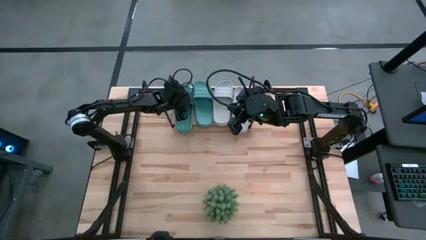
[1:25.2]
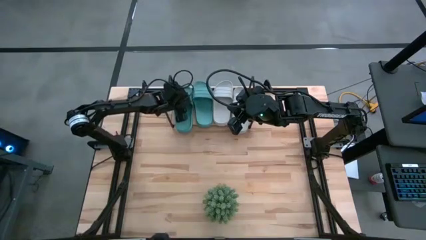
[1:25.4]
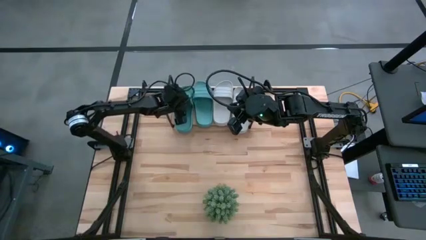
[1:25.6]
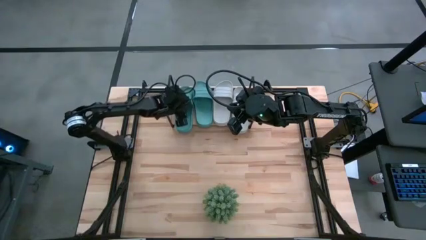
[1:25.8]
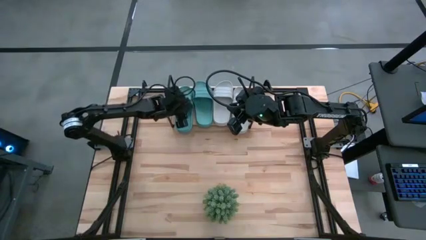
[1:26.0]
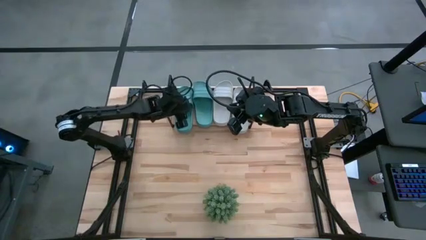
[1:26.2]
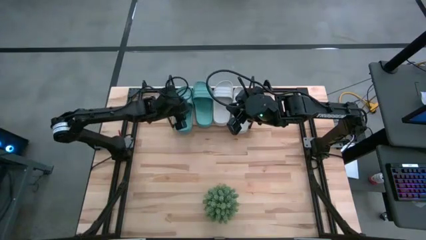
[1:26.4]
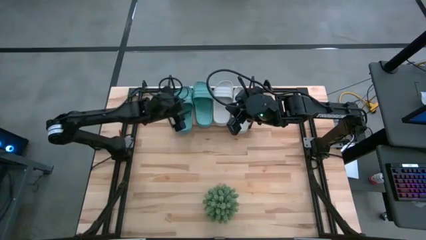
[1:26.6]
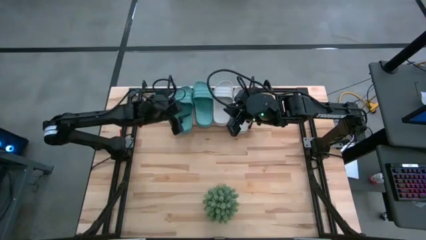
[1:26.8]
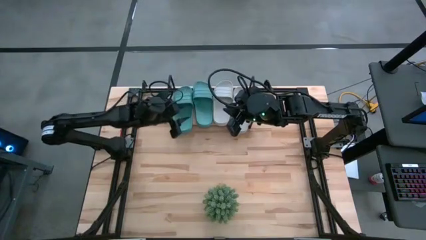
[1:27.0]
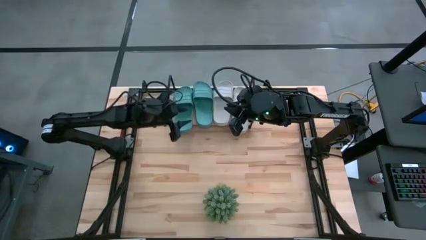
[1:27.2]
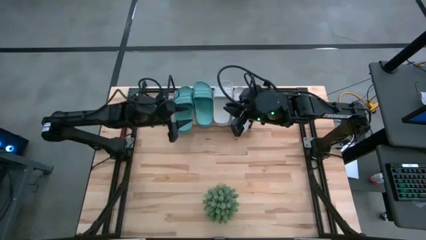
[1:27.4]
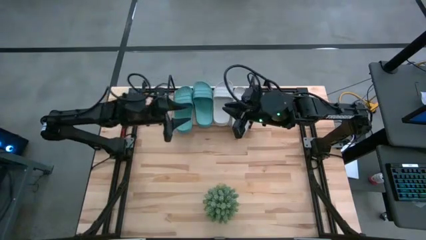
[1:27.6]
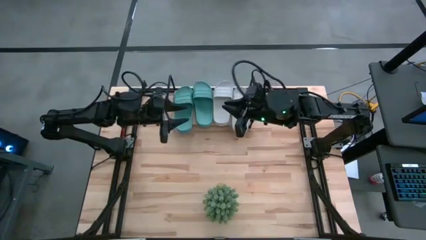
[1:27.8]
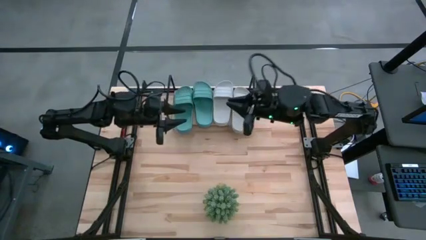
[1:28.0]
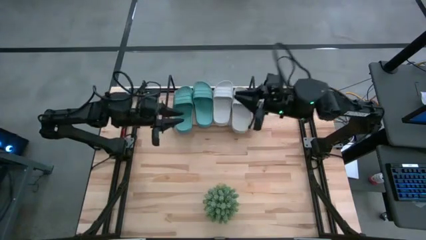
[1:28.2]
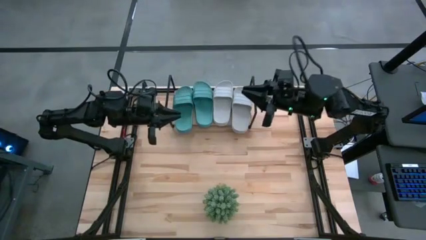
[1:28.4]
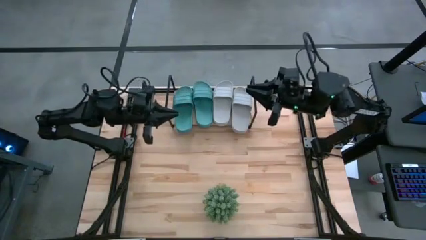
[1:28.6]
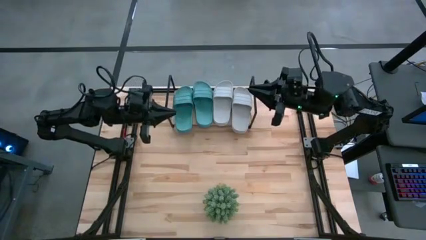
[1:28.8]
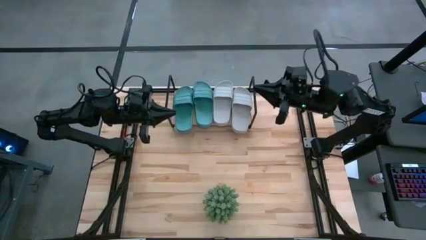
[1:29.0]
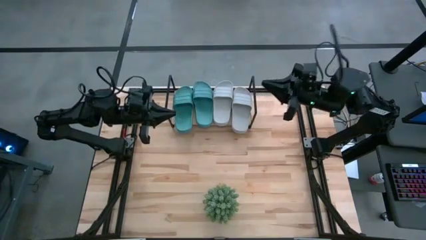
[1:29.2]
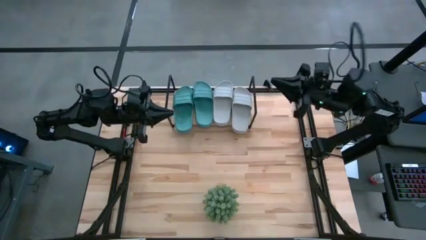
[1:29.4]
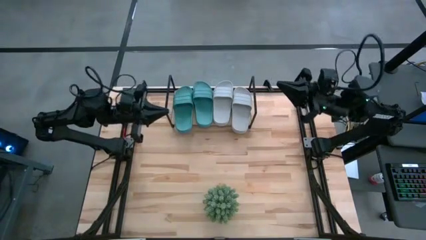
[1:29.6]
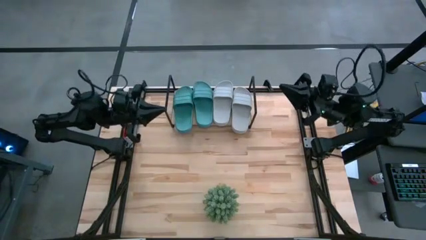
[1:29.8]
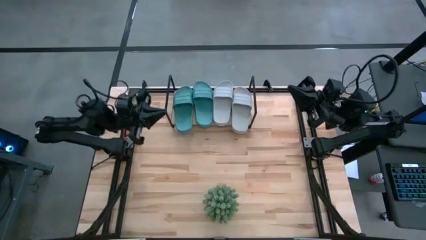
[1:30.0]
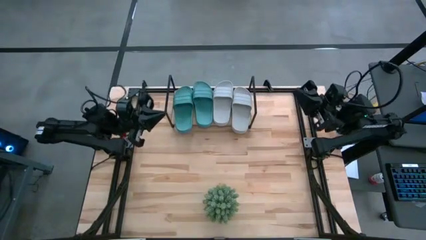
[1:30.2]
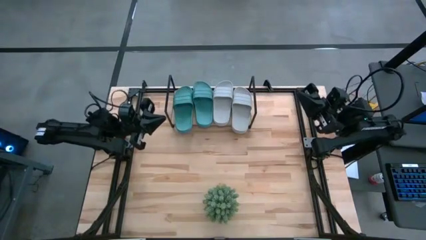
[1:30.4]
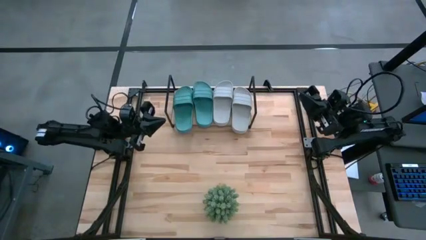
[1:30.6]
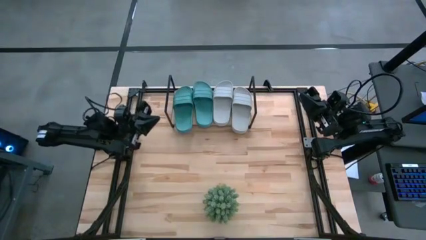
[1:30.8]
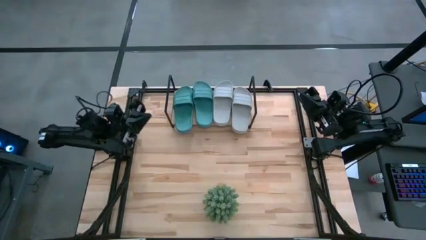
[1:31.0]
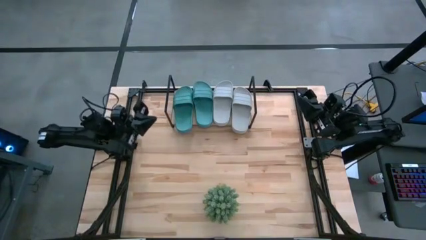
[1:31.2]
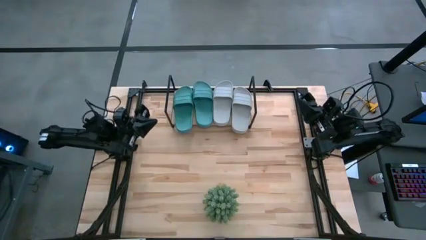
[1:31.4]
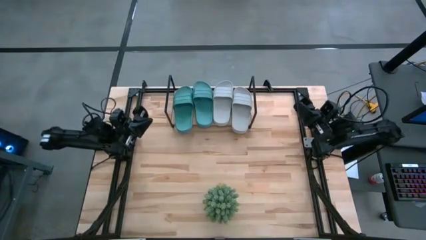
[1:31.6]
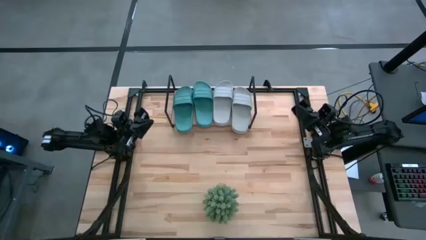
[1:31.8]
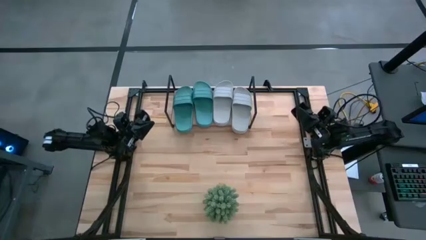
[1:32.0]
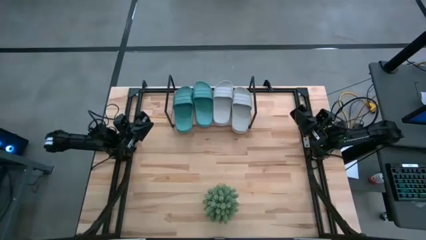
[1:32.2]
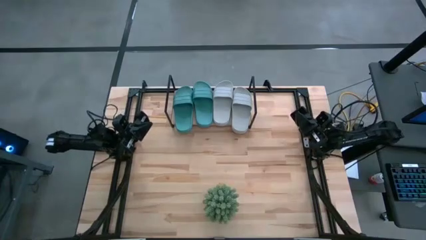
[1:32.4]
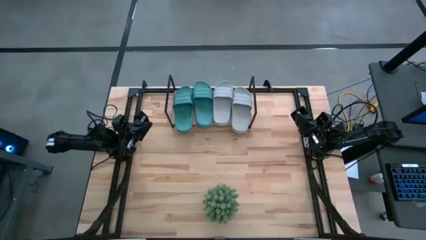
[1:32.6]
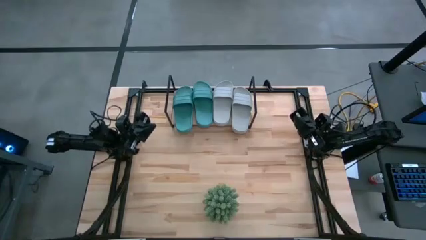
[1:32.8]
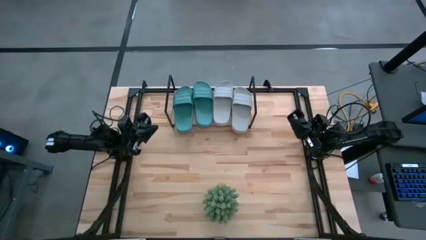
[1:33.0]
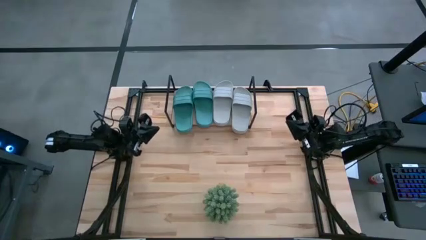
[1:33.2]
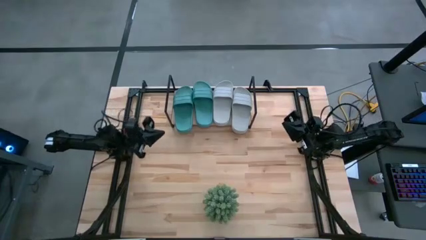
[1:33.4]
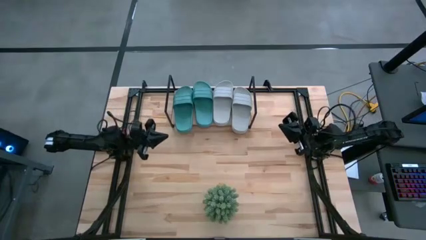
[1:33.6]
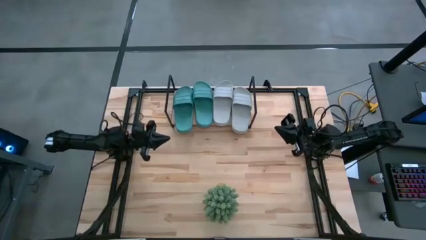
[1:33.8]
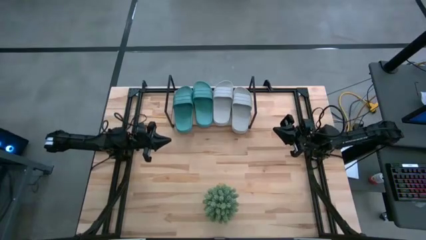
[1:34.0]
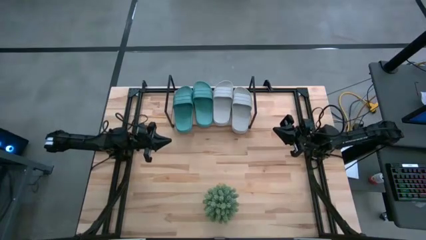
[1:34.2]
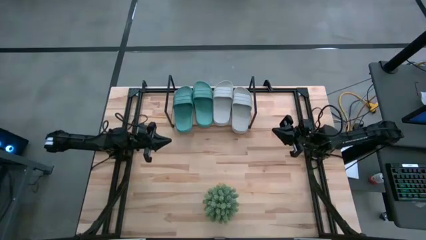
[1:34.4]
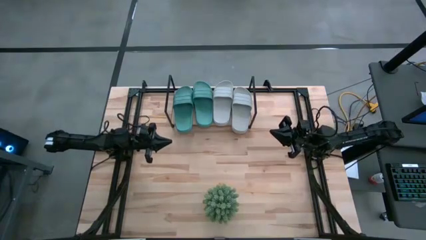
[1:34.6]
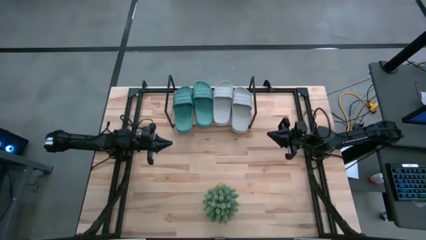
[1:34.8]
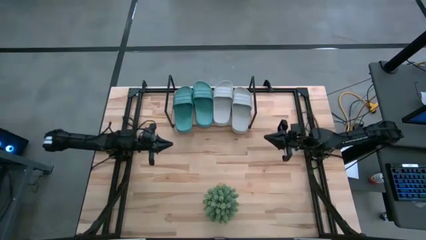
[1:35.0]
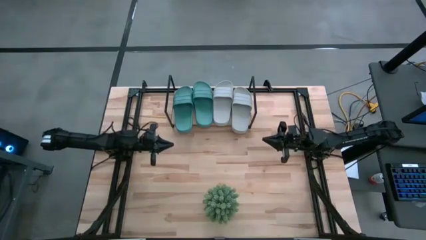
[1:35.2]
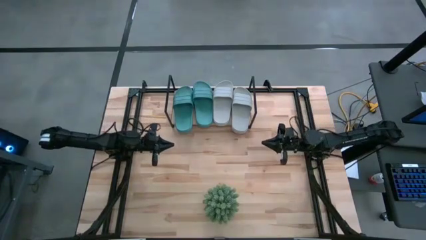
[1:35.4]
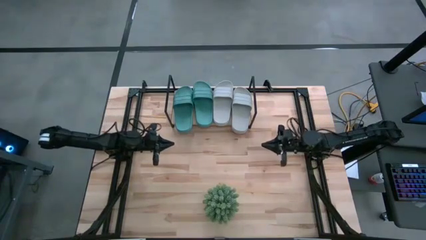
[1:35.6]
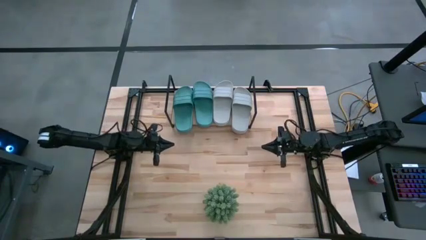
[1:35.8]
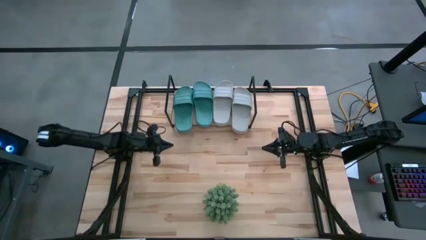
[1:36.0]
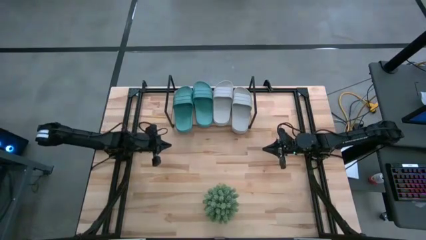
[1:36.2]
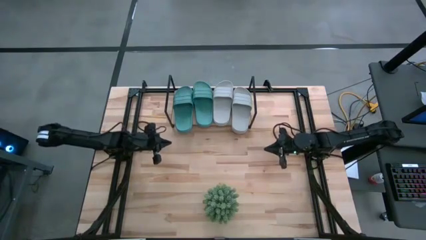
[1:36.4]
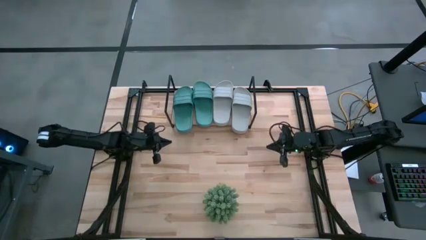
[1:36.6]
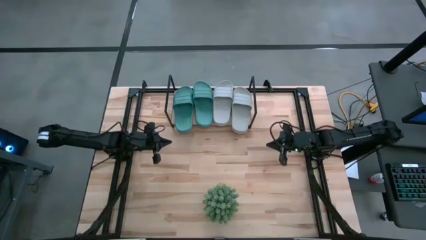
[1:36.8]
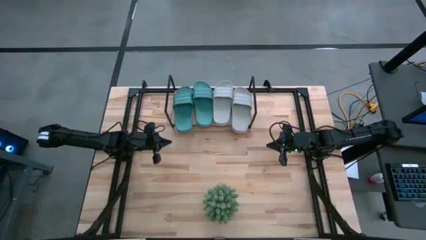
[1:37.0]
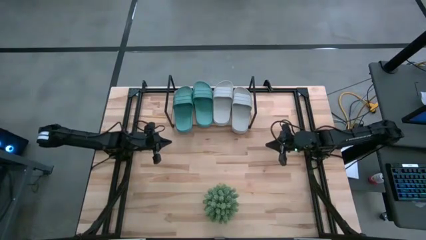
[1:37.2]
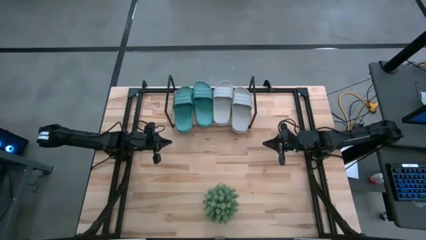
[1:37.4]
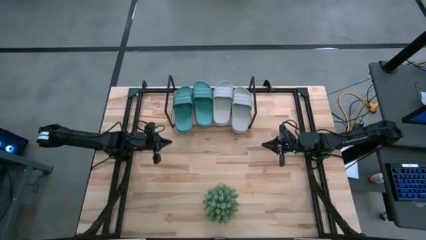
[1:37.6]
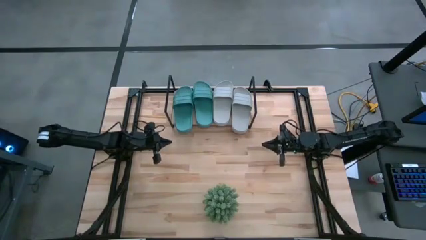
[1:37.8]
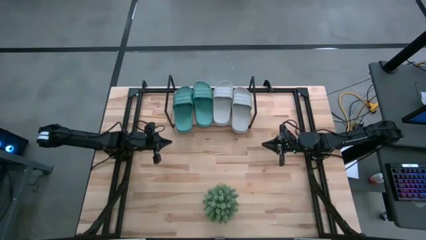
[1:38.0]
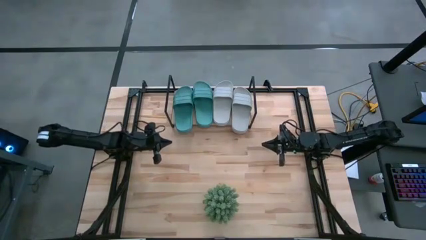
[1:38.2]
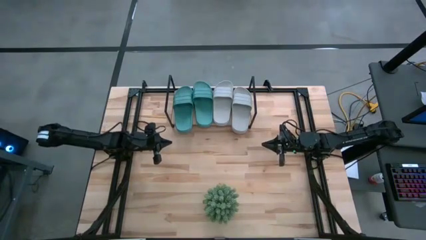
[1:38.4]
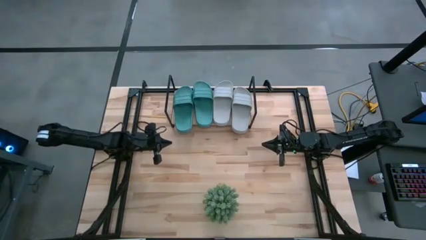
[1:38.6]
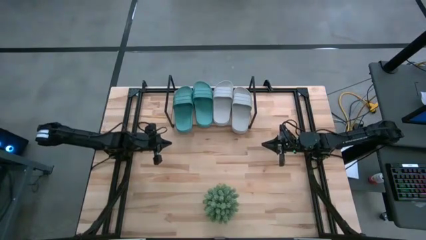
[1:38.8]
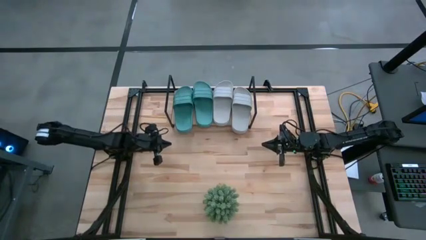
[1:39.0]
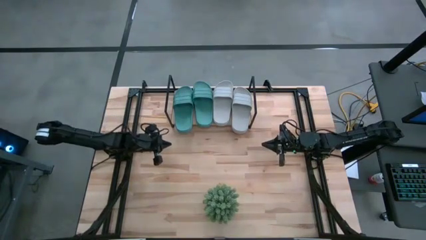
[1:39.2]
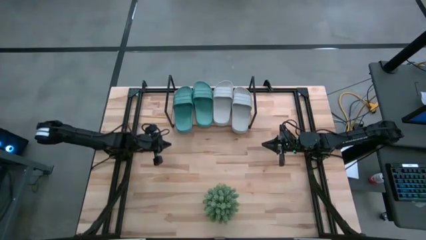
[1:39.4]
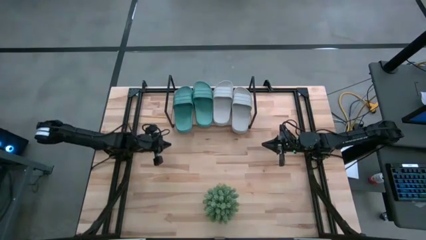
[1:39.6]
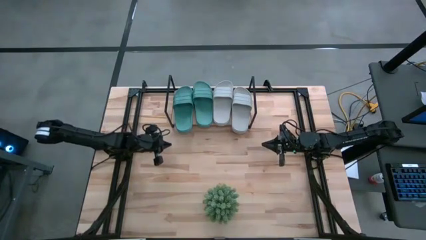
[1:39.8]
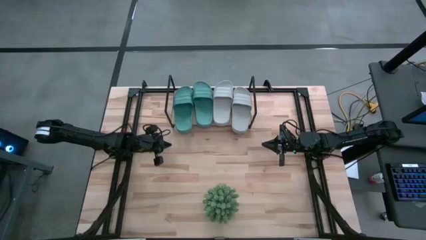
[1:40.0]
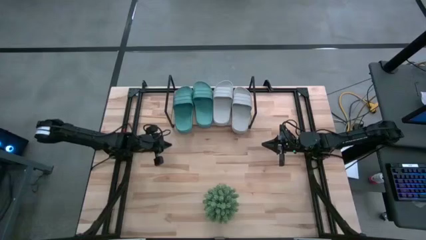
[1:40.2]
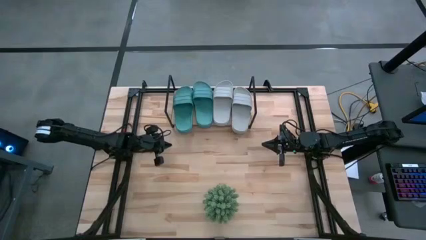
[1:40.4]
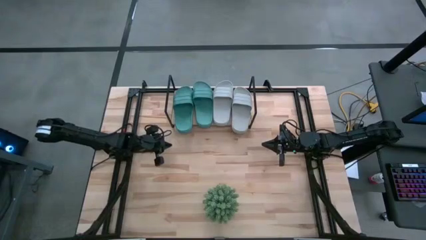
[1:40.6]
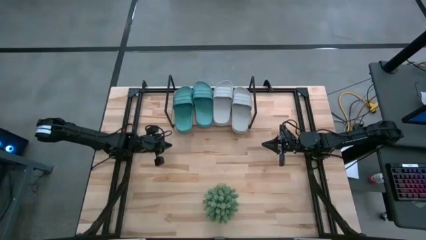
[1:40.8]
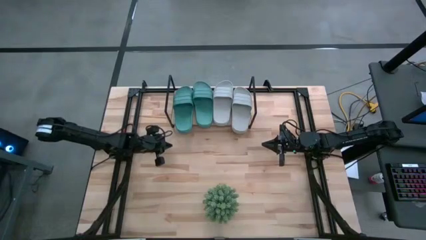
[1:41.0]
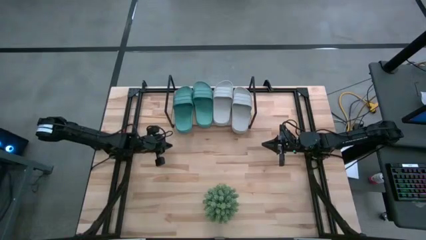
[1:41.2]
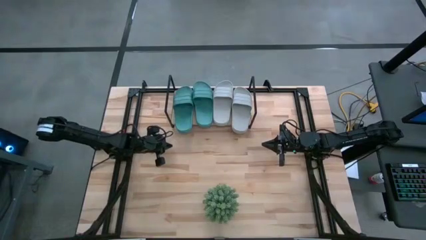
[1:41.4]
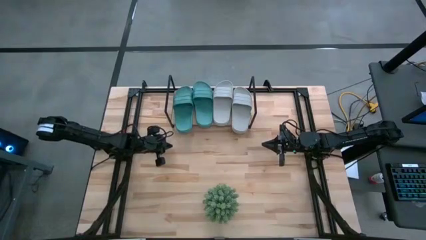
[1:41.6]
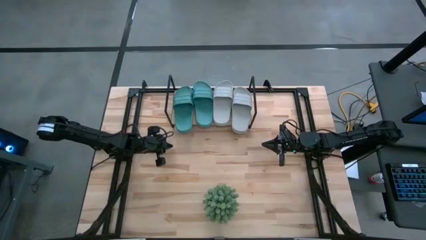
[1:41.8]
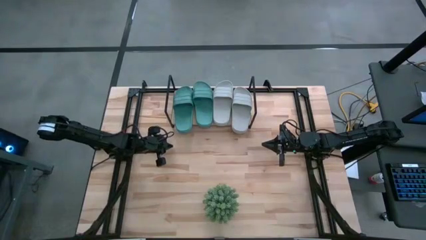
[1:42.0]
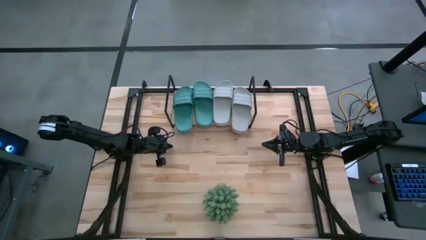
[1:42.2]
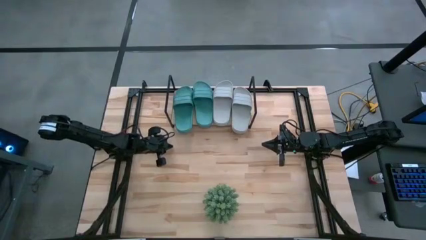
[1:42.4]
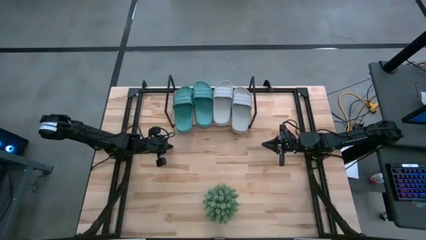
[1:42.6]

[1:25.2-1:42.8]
Task: Pick and place slides into the shelf
Return to Home Position
